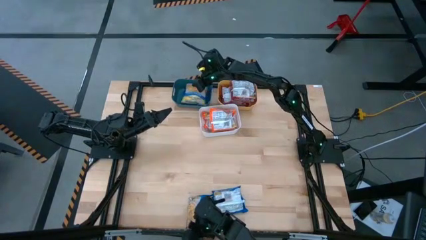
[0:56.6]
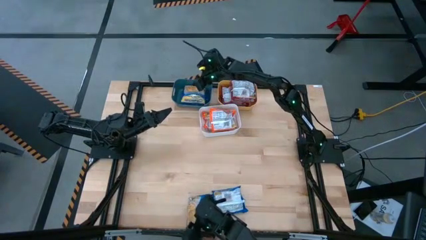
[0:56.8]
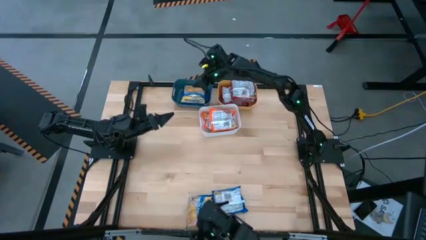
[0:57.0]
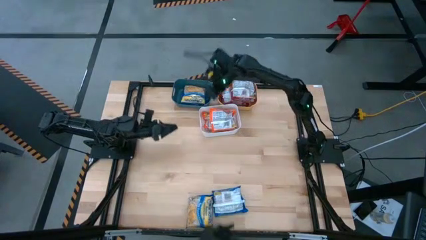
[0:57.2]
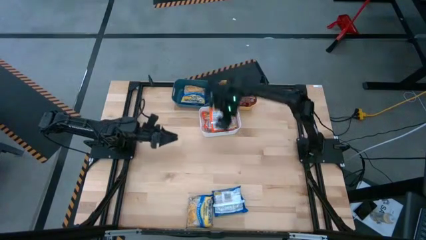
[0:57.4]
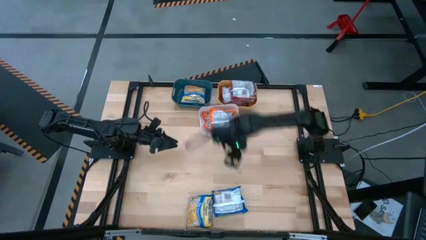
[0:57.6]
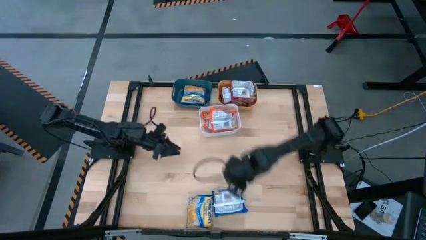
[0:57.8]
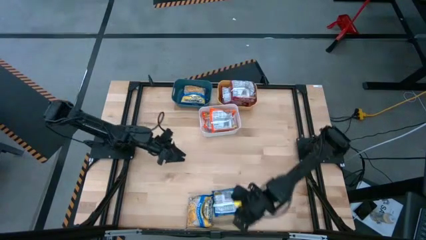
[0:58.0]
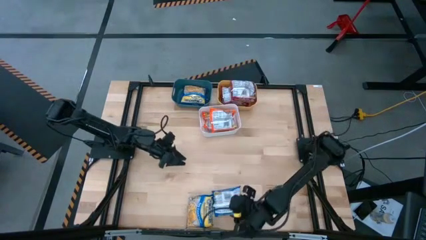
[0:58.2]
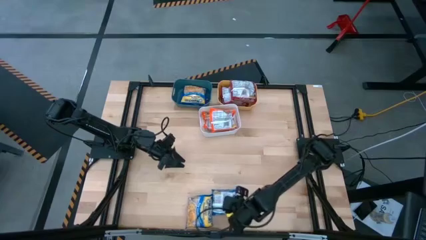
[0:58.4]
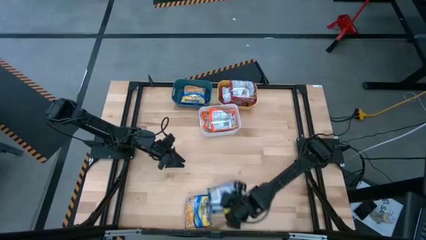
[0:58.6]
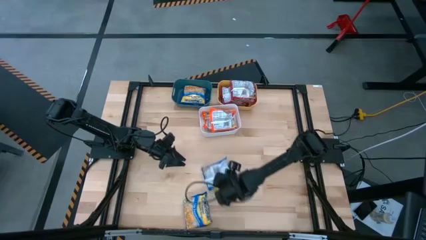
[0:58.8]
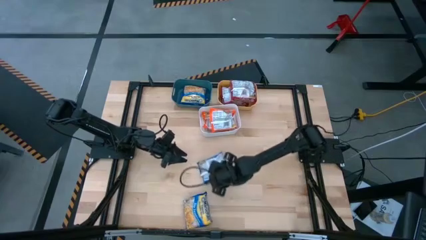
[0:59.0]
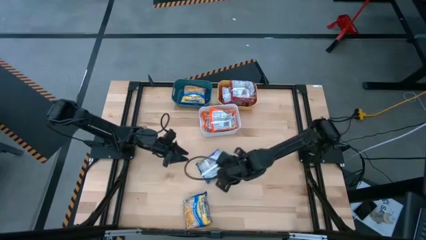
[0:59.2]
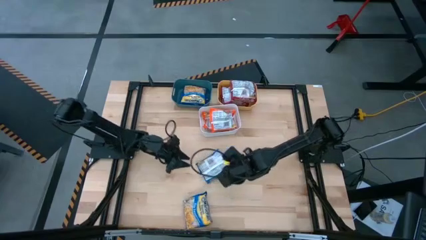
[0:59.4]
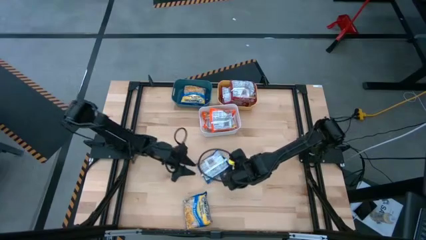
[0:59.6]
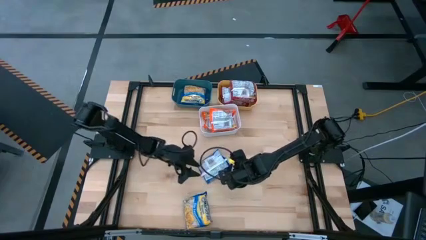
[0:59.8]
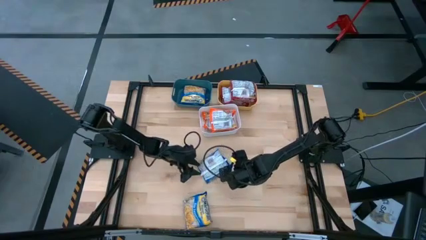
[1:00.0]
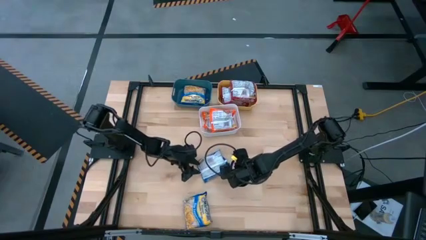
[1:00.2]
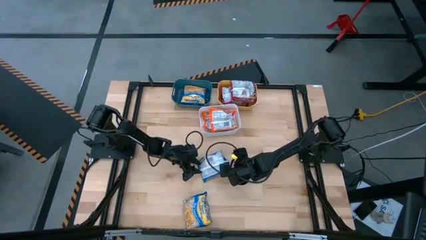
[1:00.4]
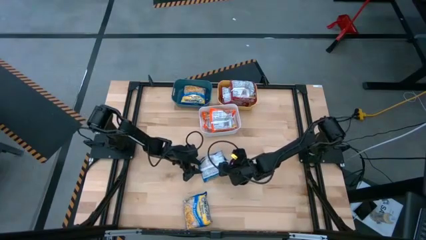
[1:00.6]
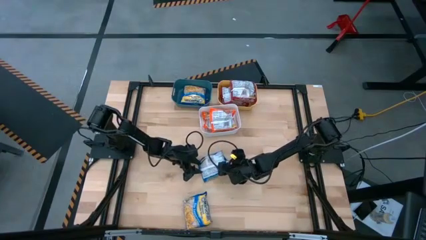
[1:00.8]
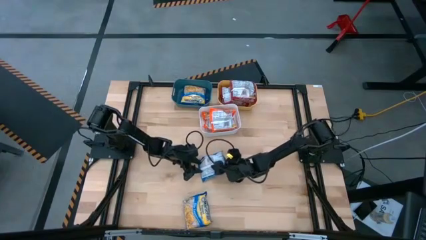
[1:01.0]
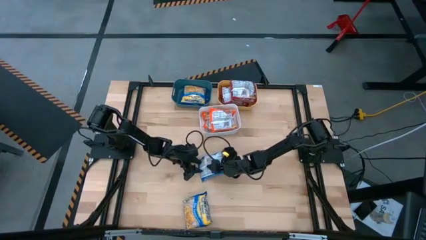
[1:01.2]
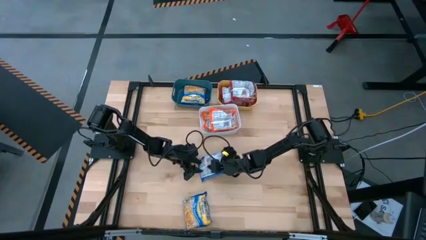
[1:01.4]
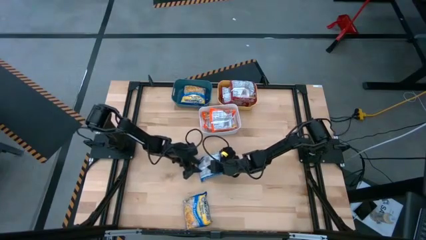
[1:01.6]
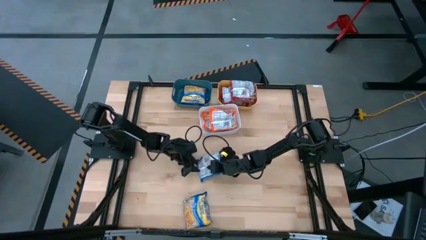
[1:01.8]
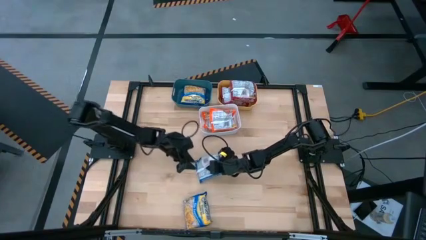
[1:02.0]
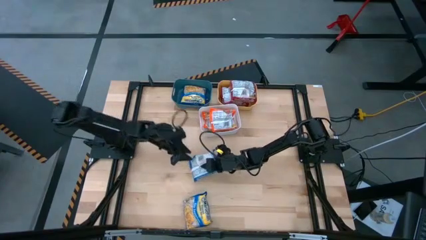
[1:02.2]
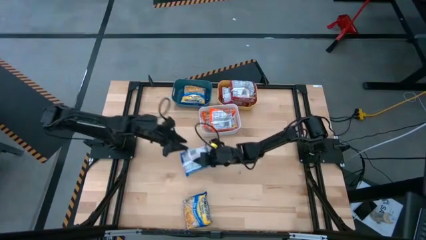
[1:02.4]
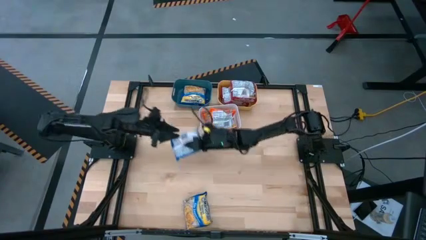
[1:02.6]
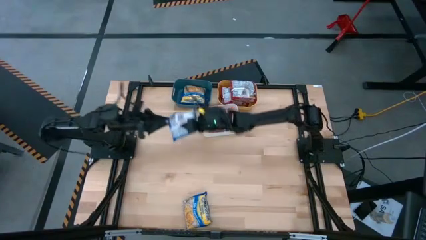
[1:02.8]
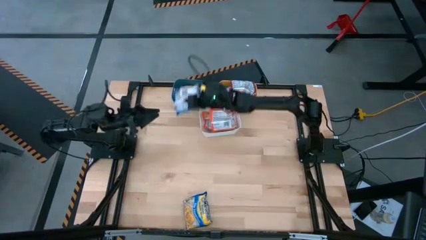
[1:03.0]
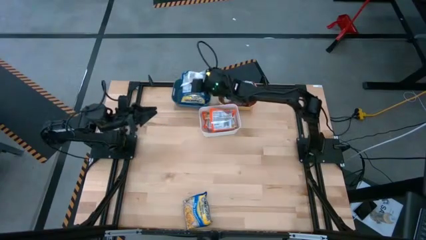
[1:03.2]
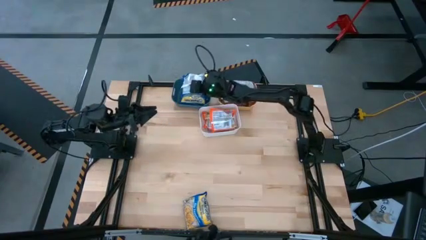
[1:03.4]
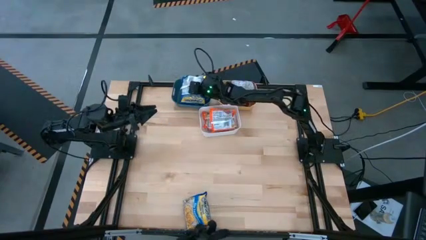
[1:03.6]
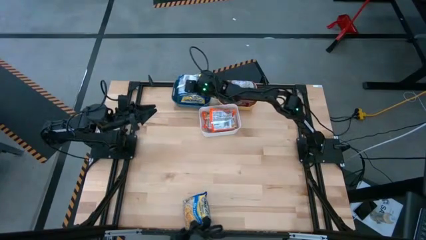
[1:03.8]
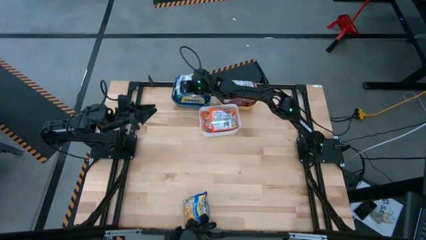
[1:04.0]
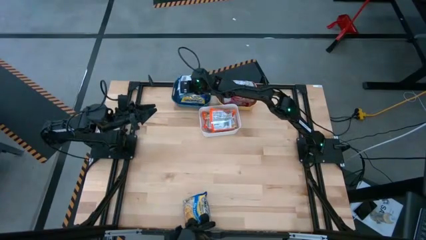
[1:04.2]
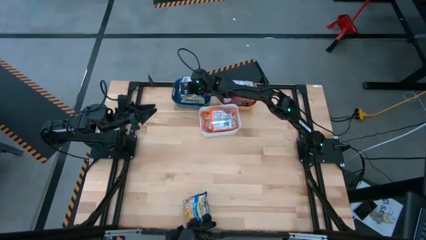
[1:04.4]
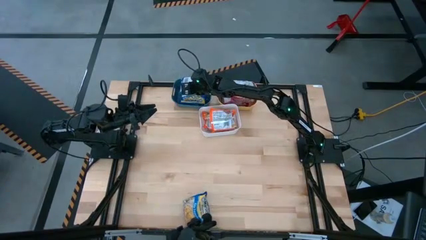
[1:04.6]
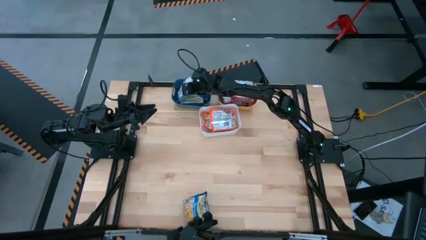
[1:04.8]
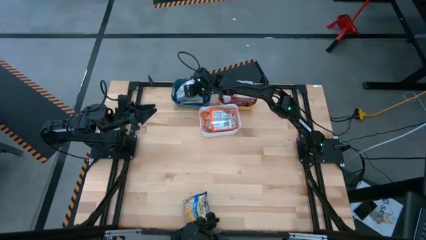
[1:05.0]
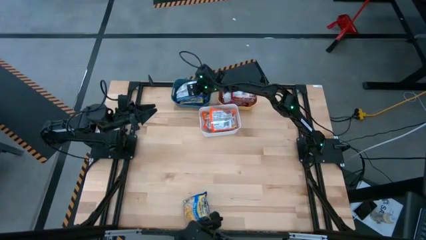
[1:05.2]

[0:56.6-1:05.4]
Task: Sort Maruchan noodles
Put the right blue noodle pack into the blue bin

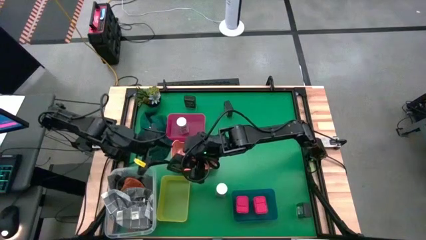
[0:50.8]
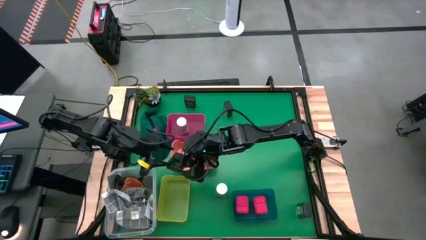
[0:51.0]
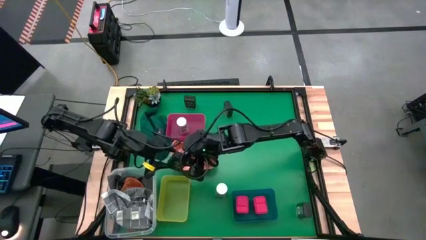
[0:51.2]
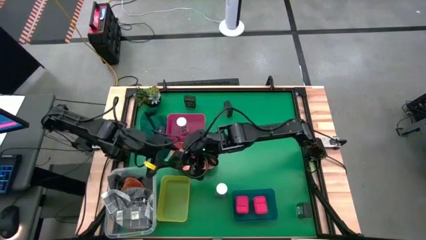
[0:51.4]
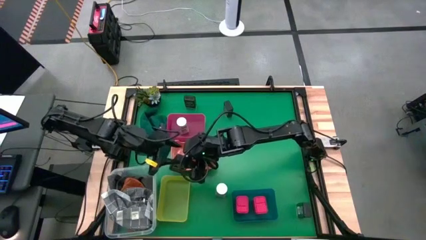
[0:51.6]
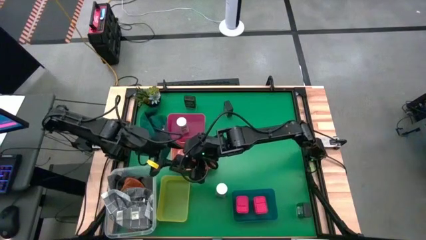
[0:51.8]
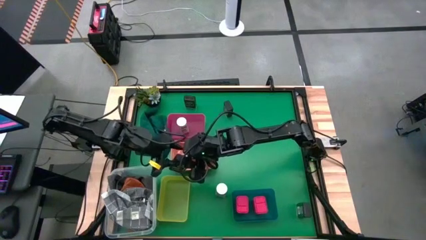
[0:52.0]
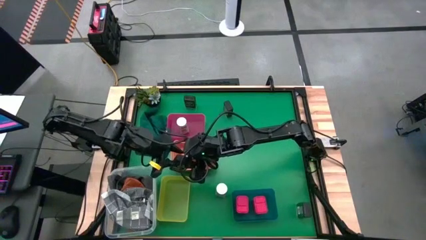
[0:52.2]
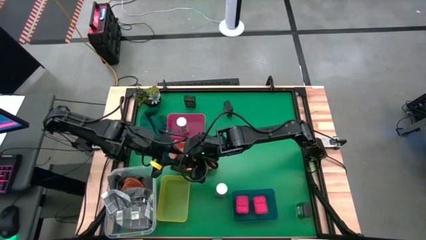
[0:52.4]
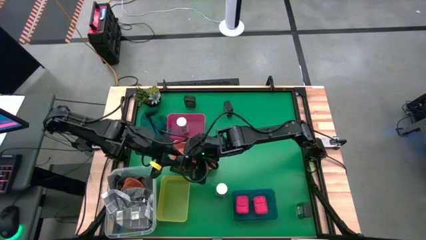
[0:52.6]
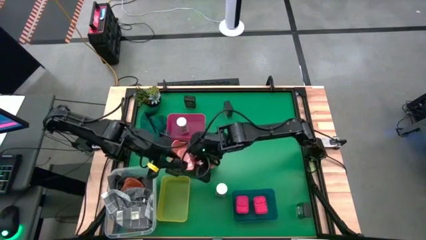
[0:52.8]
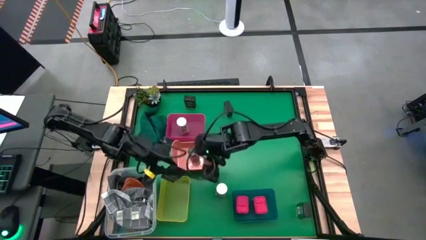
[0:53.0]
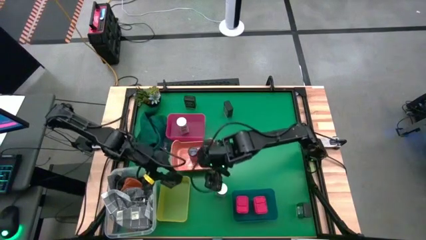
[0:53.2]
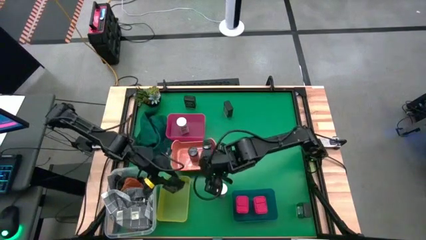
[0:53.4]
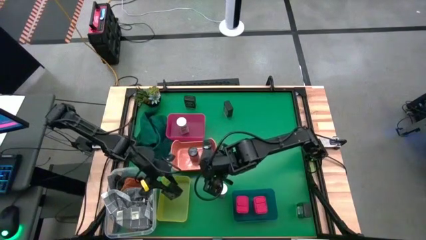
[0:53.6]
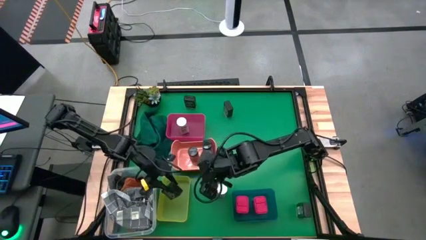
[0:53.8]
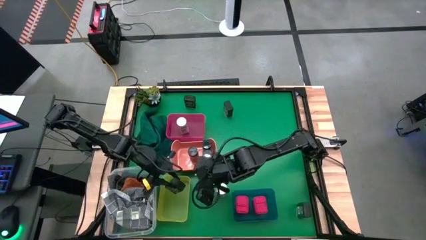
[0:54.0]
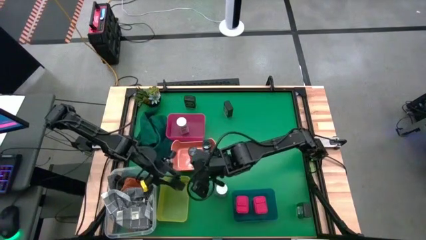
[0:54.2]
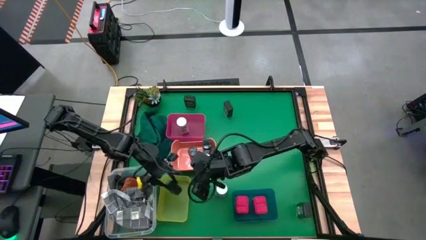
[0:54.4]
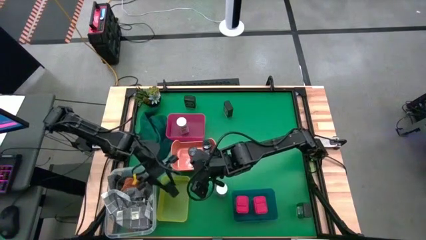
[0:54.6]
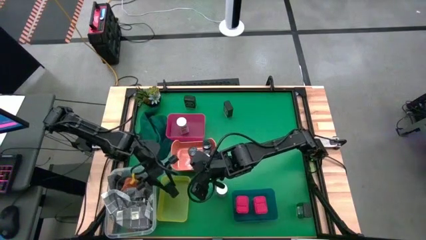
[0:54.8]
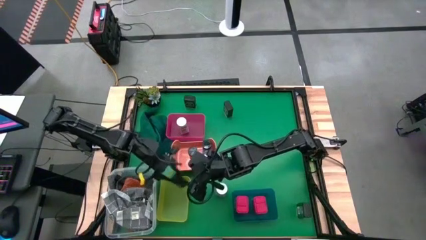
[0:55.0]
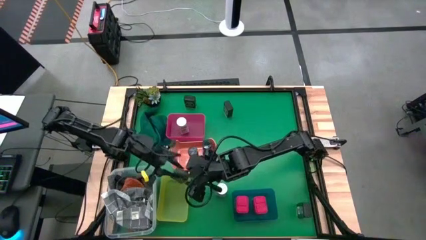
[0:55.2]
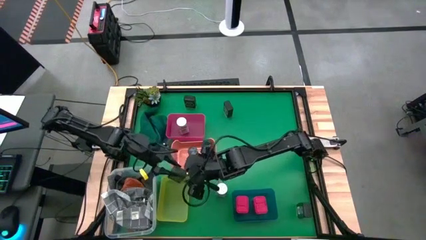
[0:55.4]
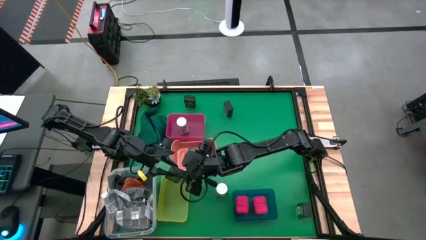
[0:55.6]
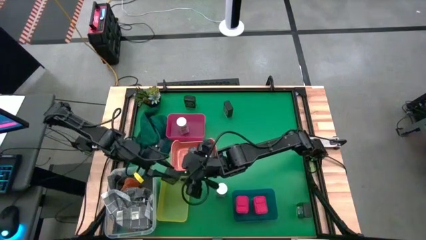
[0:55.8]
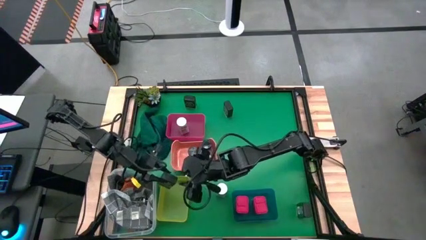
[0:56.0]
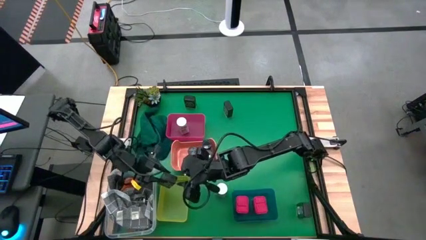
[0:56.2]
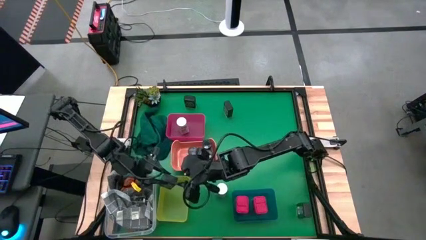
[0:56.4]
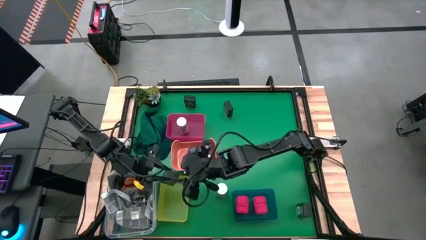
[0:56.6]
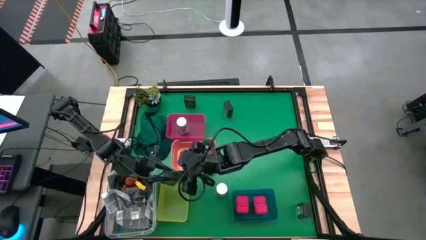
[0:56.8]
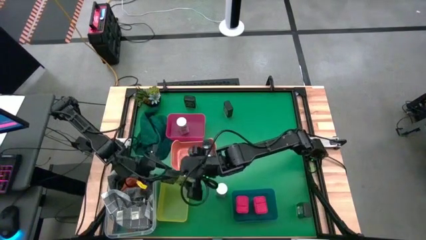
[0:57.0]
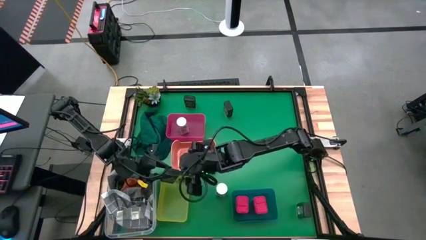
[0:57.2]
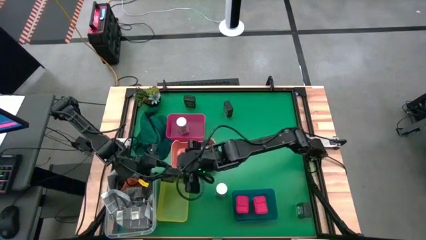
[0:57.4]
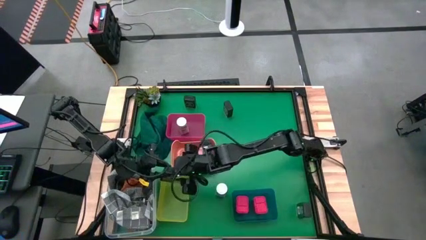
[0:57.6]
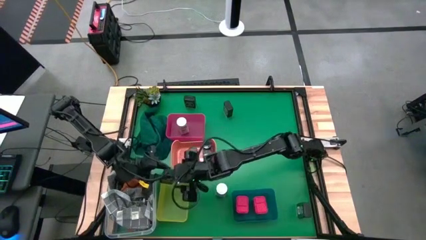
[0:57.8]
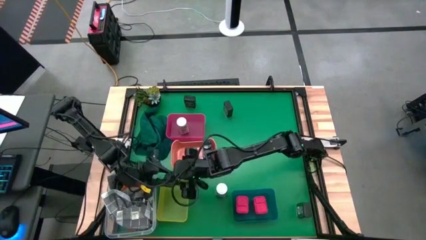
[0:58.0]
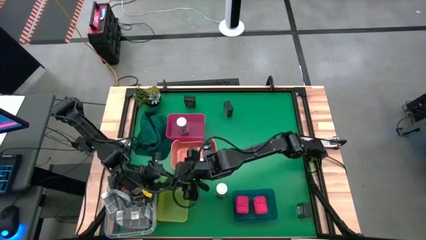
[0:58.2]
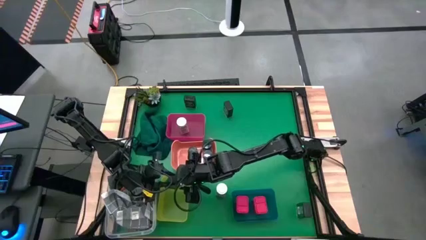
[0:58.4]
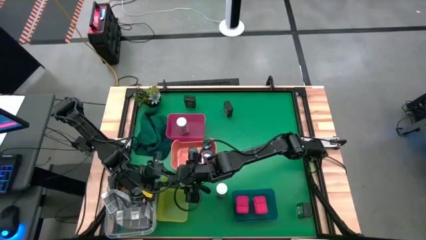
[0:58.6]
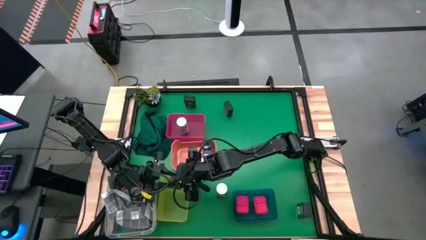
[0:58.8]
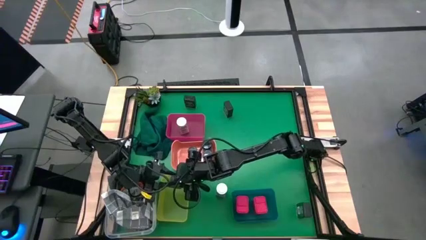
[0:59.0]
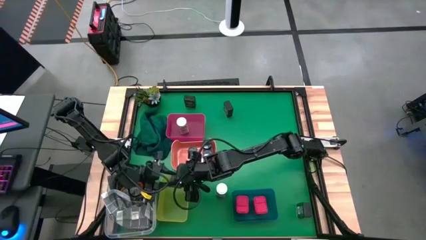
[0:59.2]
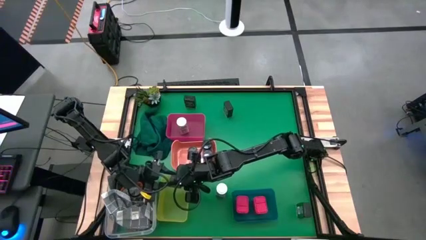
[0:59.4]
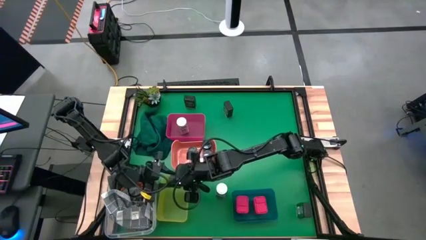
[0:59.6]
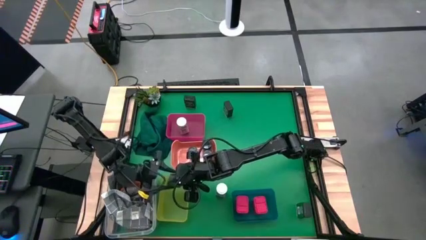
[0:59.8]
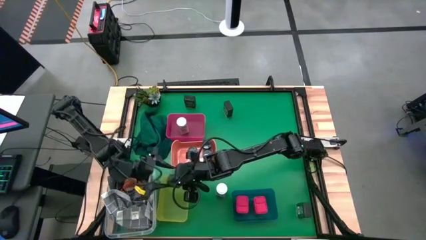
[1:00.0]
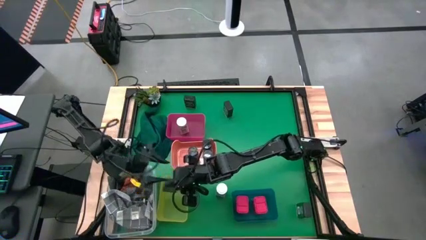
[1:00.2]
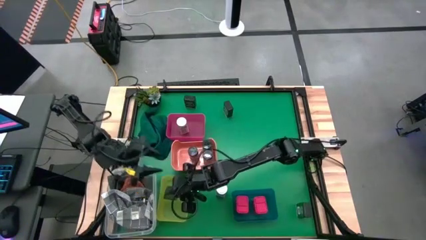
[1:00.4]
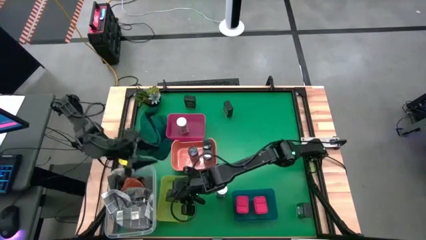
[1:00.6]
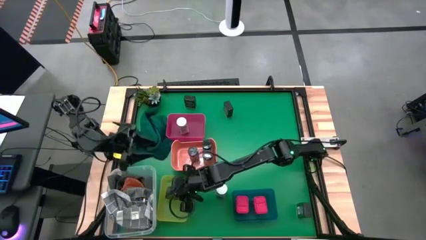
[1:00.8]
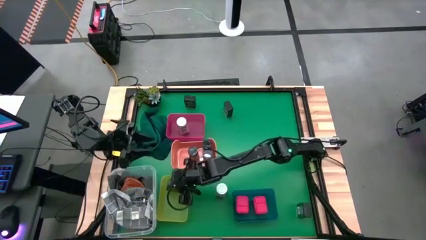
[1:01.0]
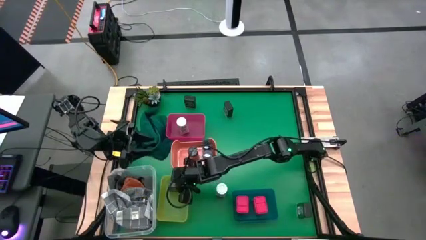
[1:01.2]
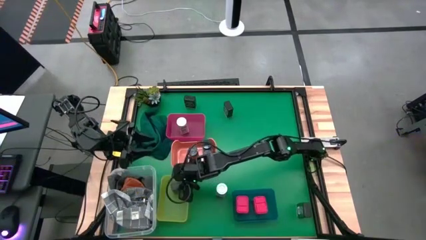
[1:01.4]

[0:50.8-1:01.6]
Task: Sort spices by type
Put the bottom left green seasoning can into the yellow bin
